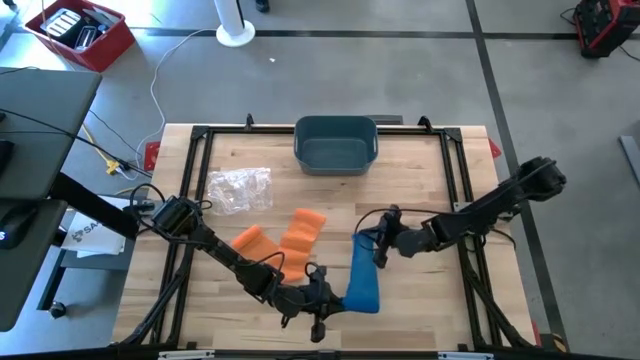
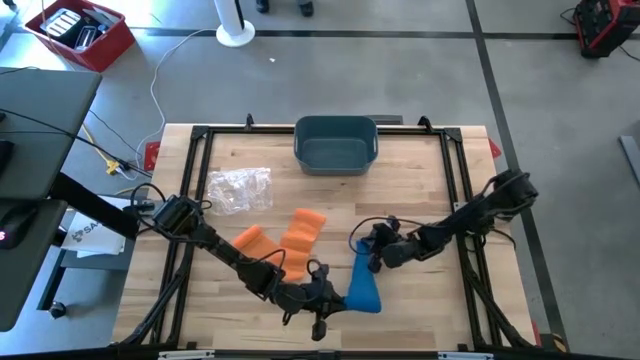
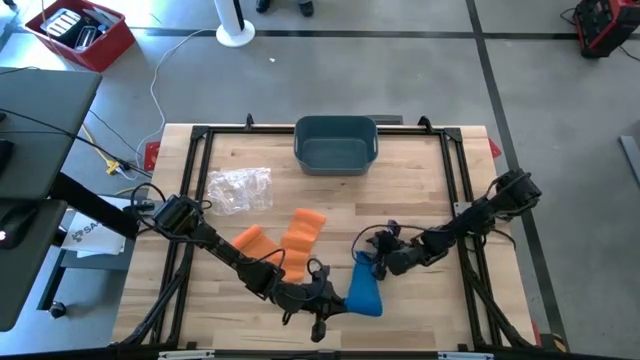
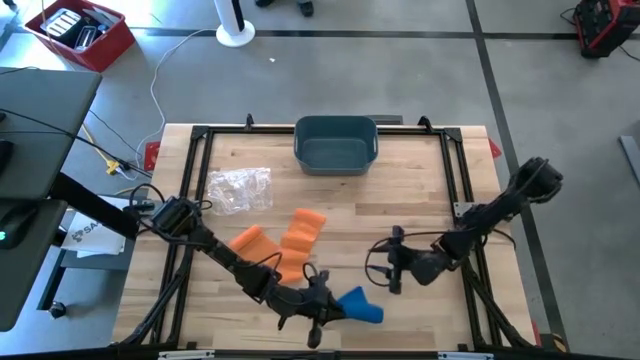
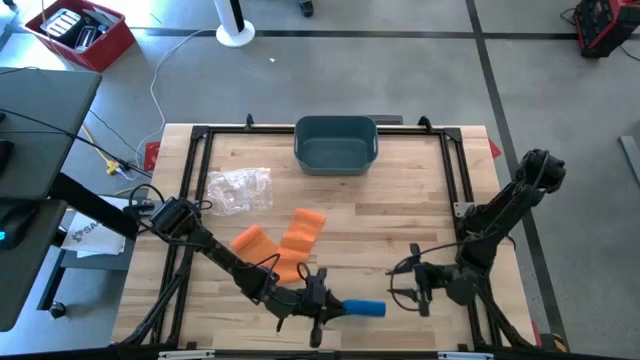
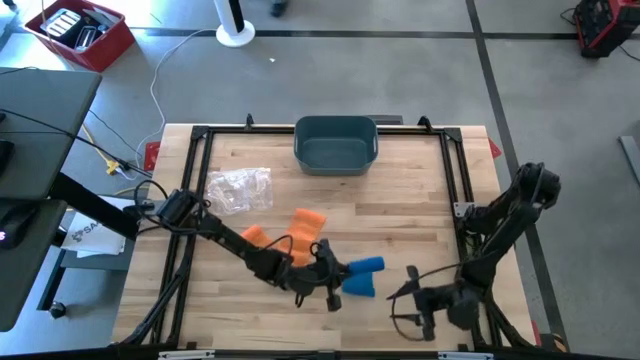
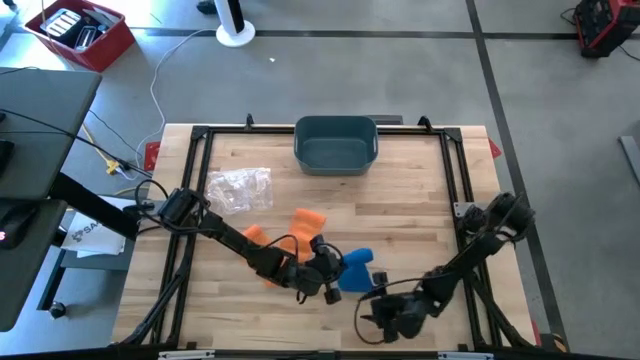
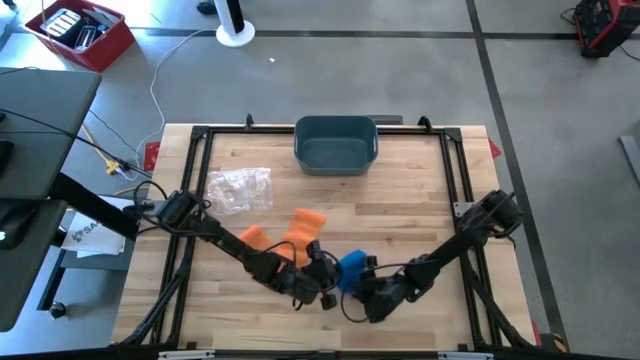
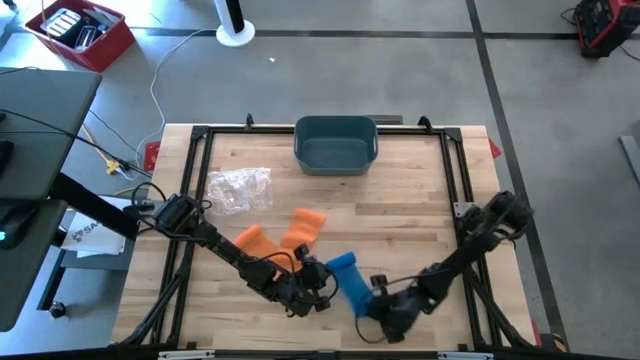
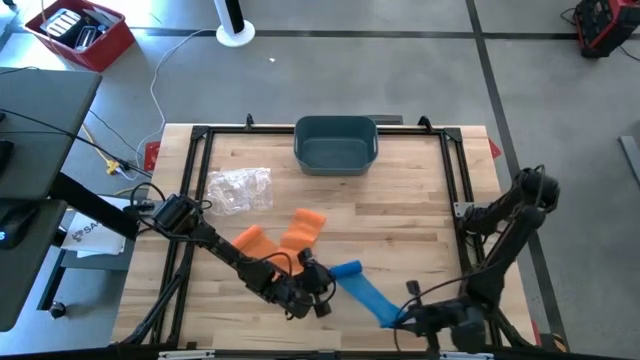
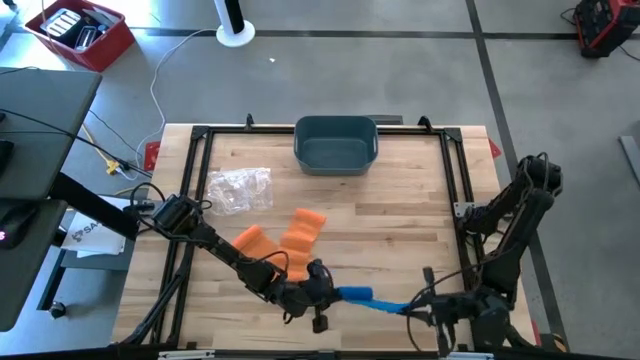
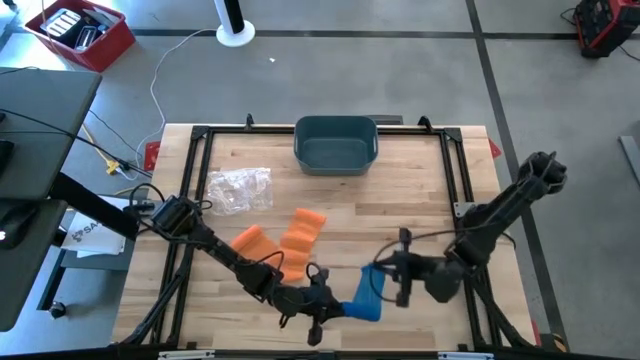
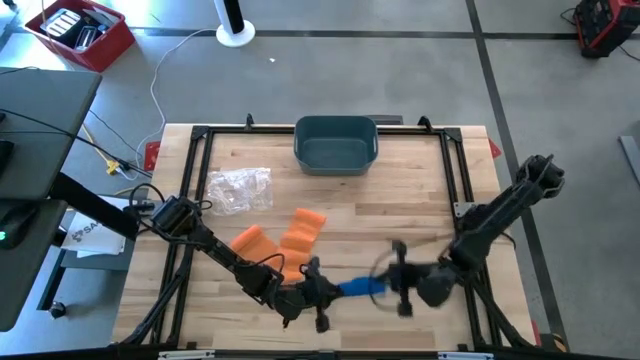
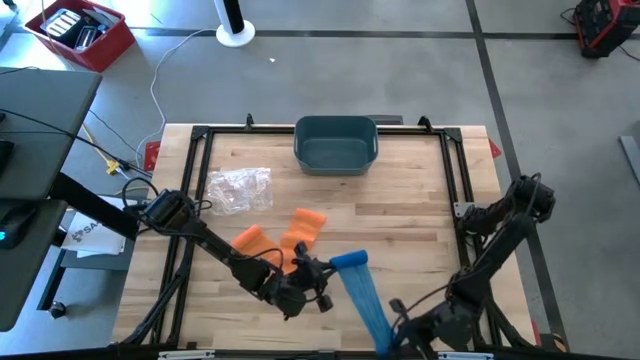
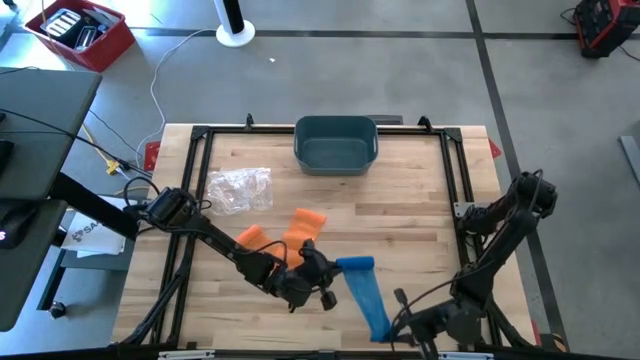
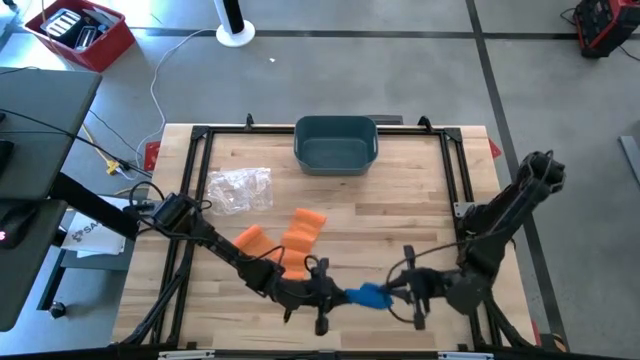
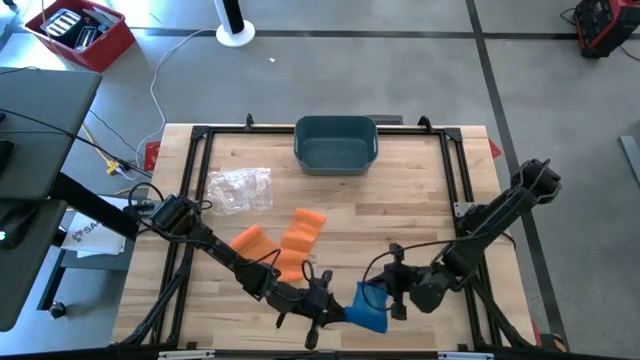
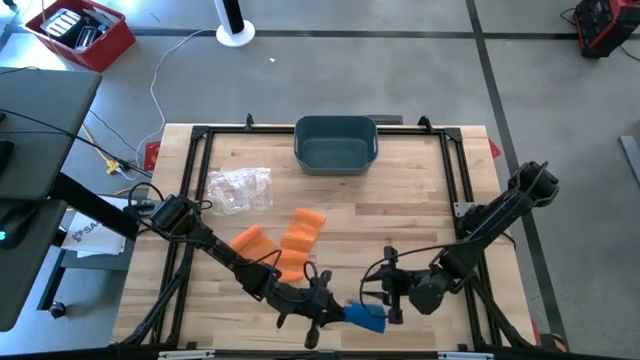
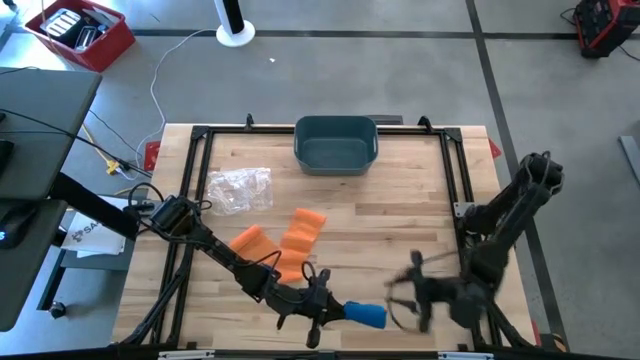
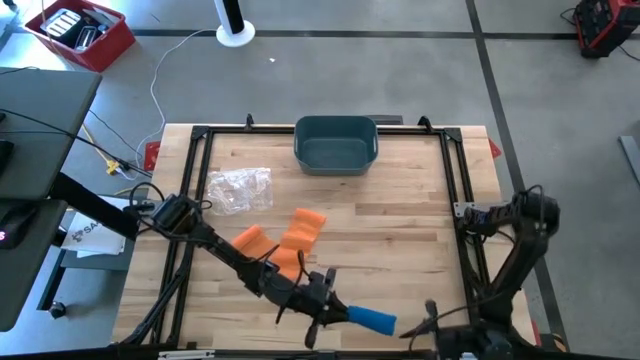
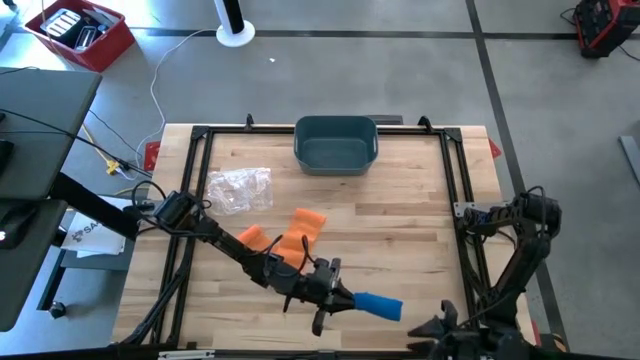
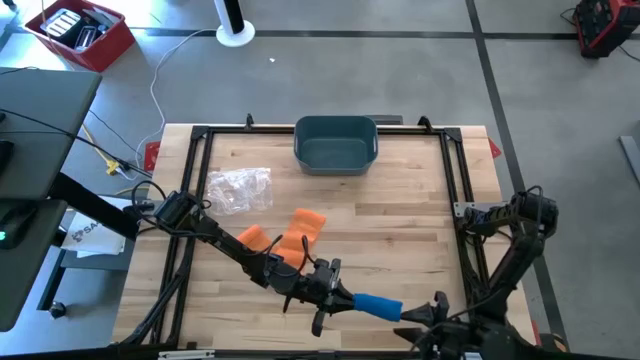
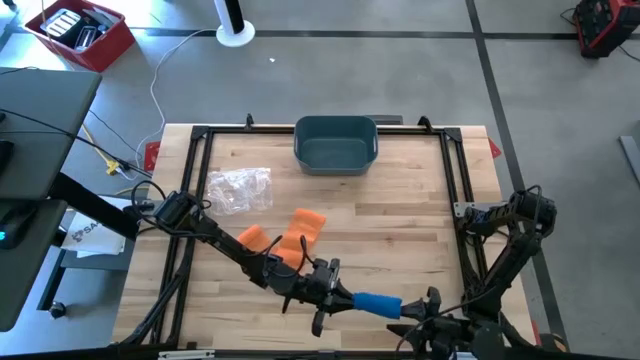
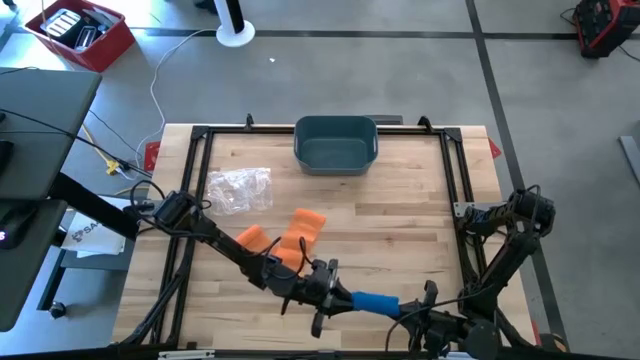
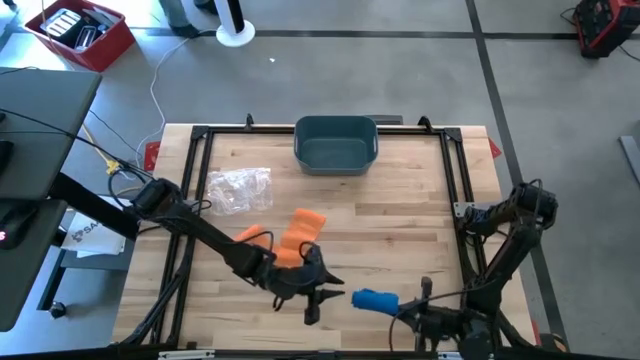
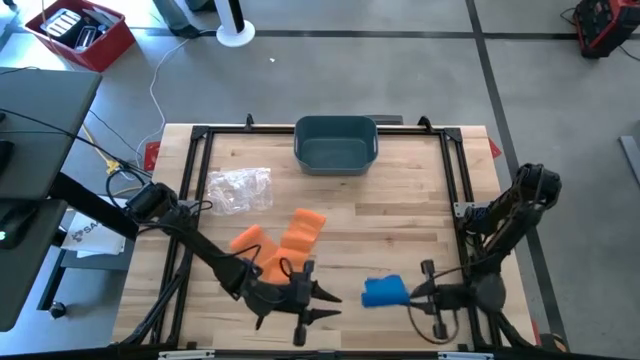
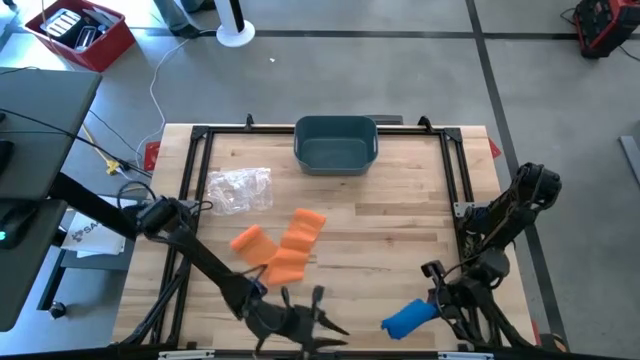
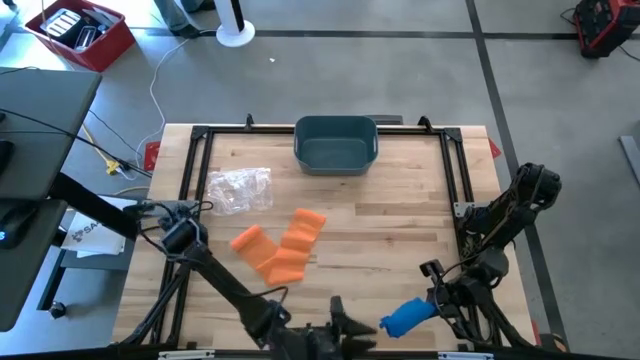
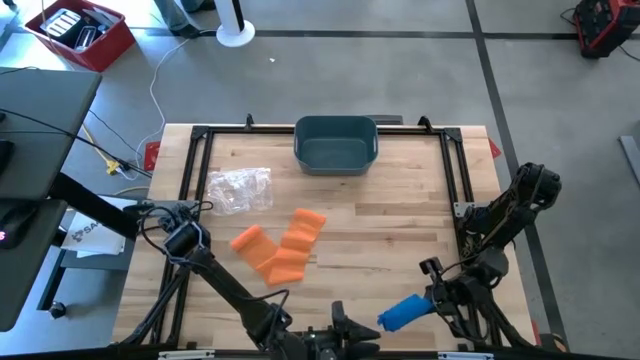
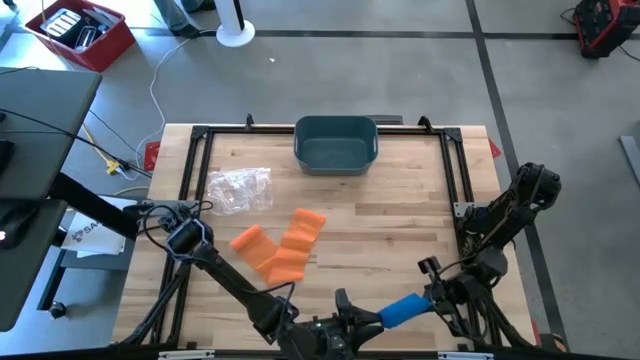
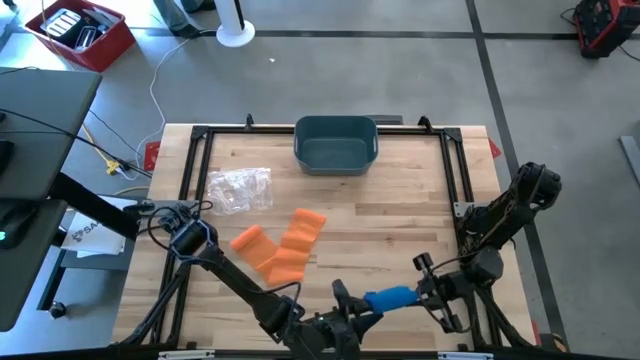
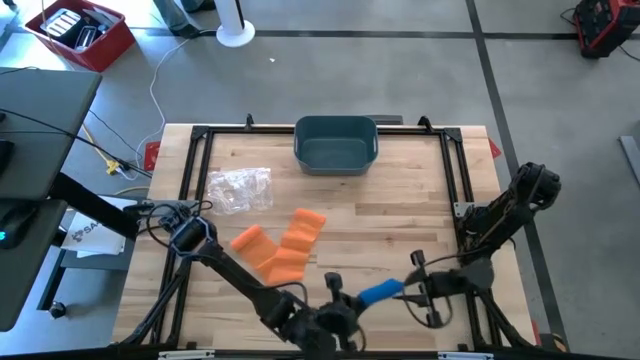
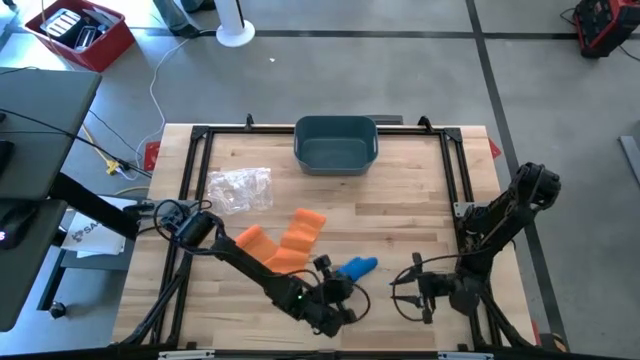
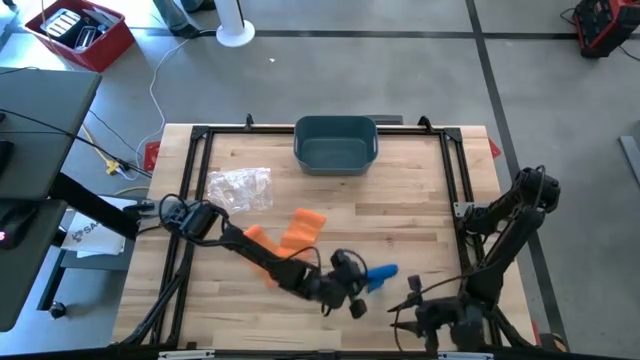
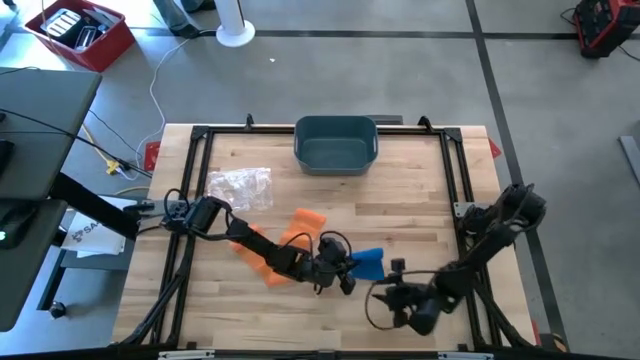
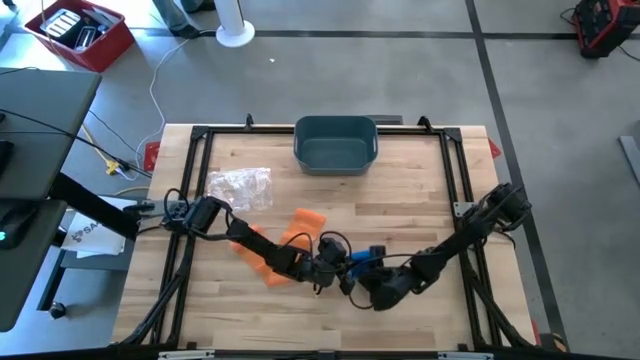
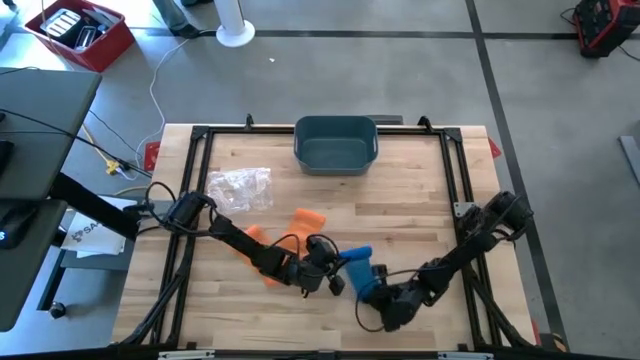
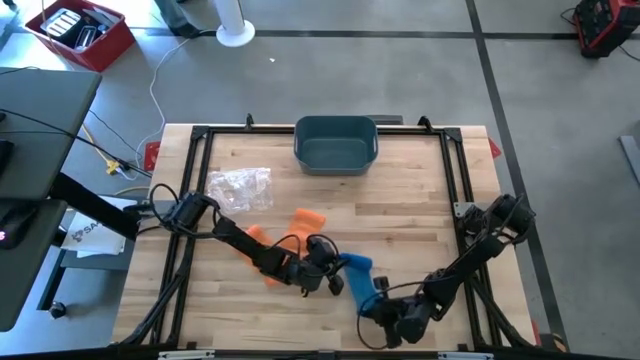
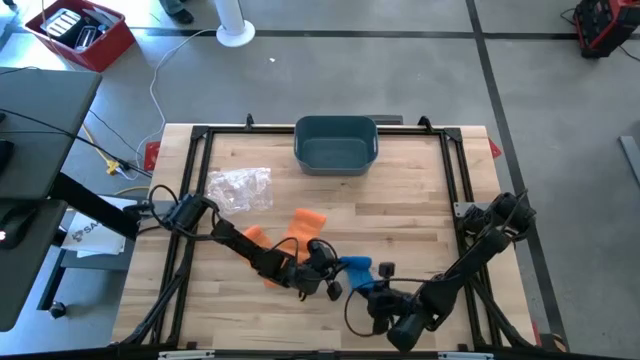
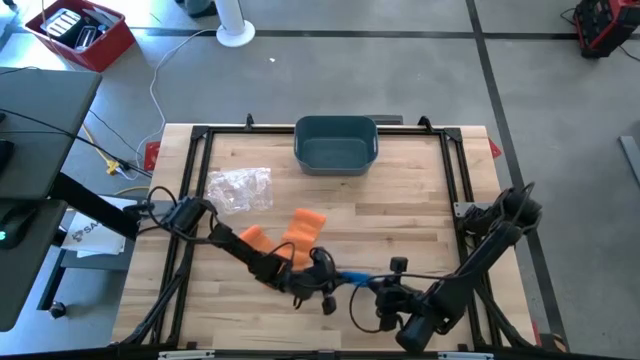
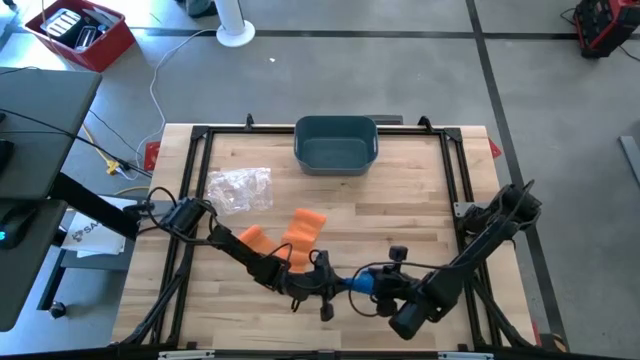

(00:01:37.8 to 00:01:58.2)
Task: Roll bandage
Roll the blue bandage
